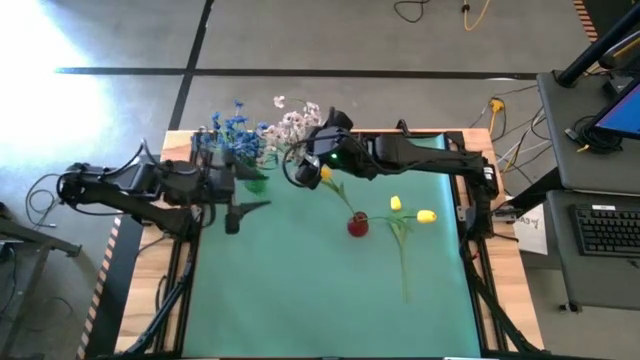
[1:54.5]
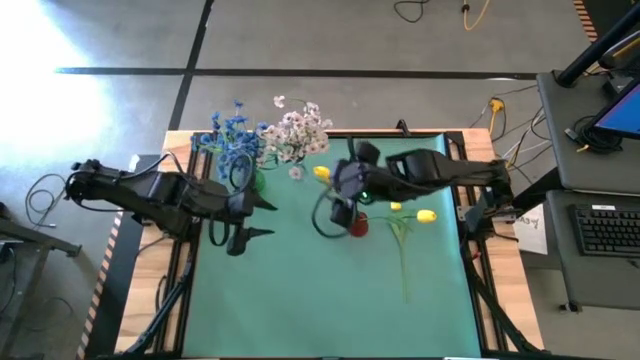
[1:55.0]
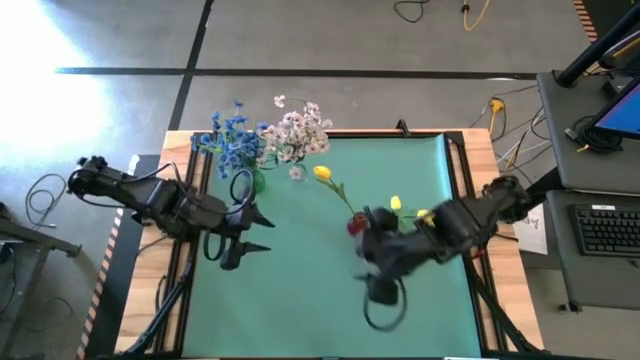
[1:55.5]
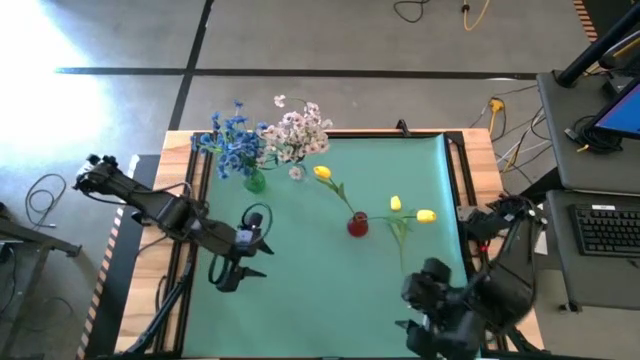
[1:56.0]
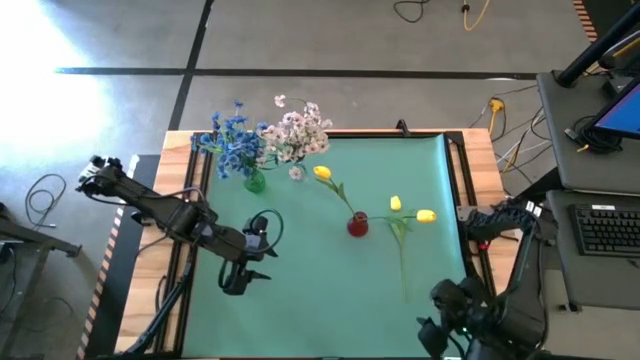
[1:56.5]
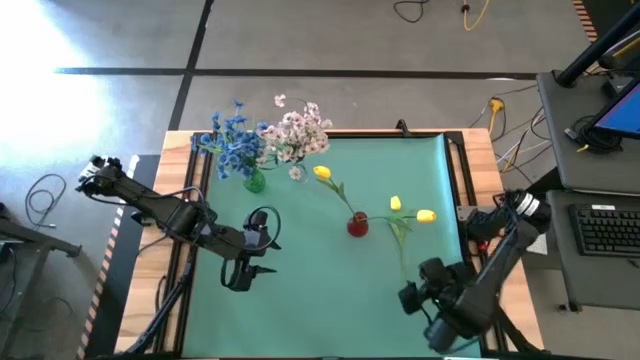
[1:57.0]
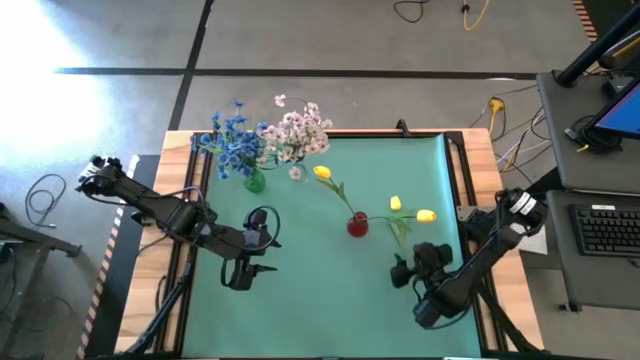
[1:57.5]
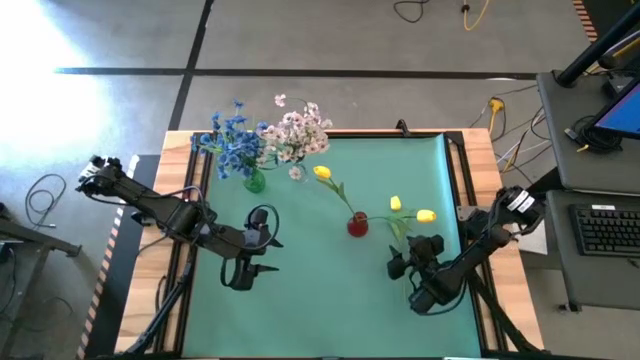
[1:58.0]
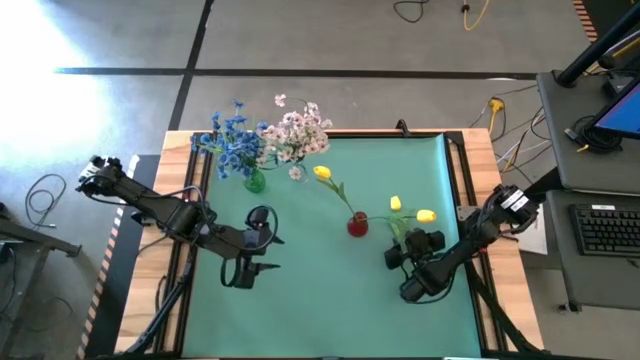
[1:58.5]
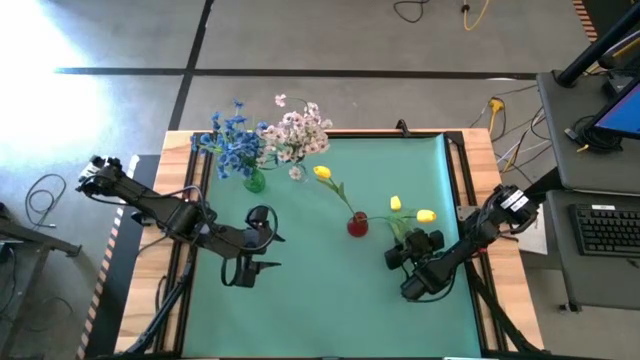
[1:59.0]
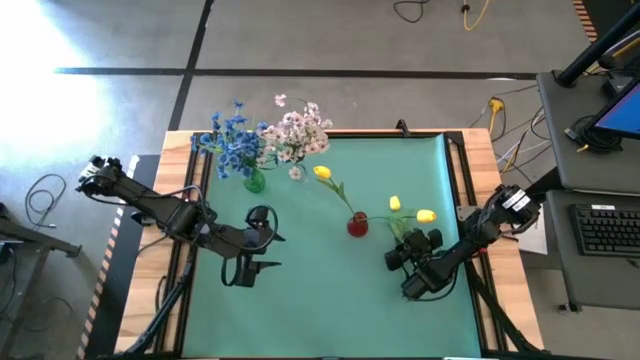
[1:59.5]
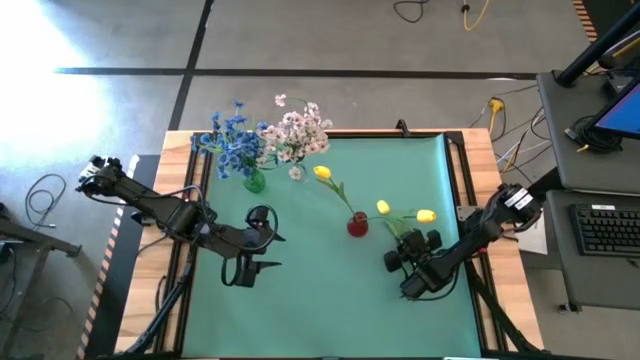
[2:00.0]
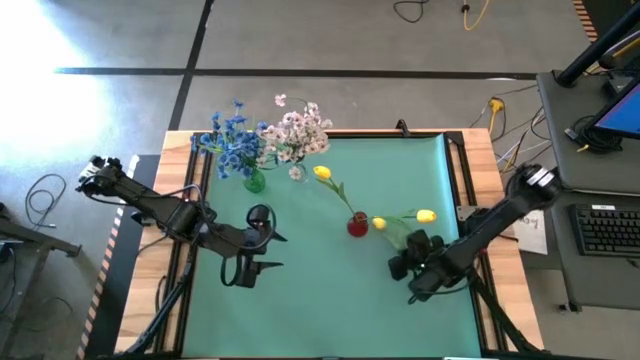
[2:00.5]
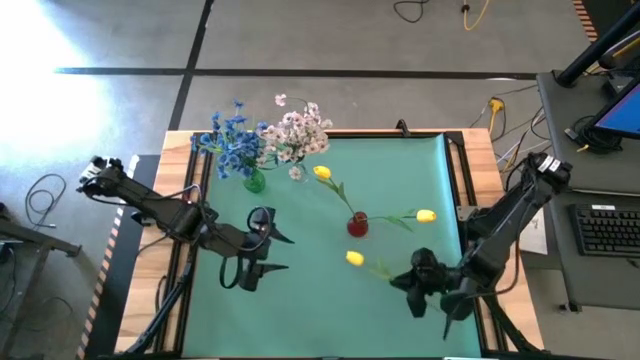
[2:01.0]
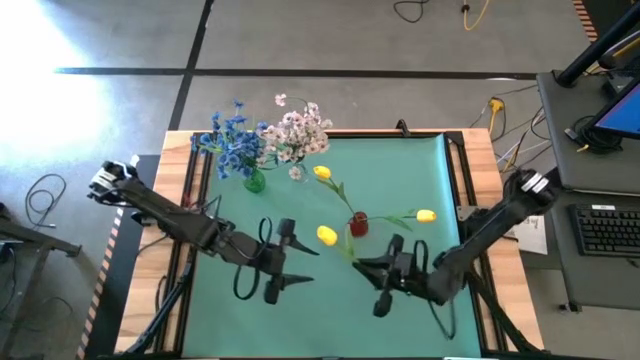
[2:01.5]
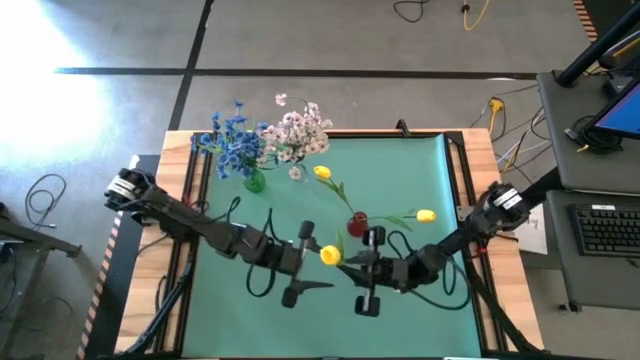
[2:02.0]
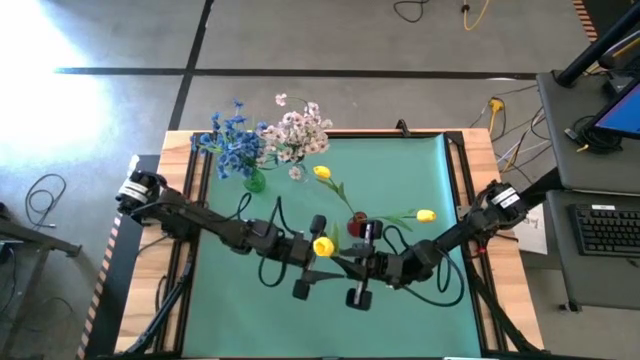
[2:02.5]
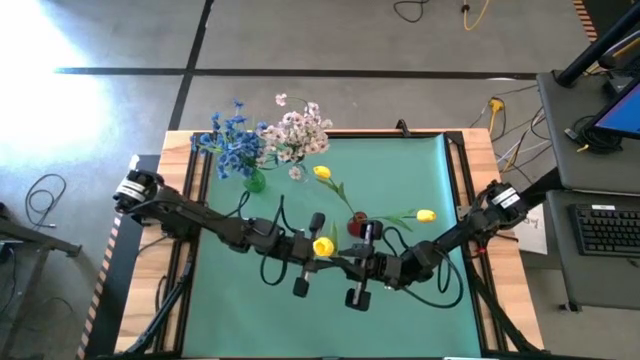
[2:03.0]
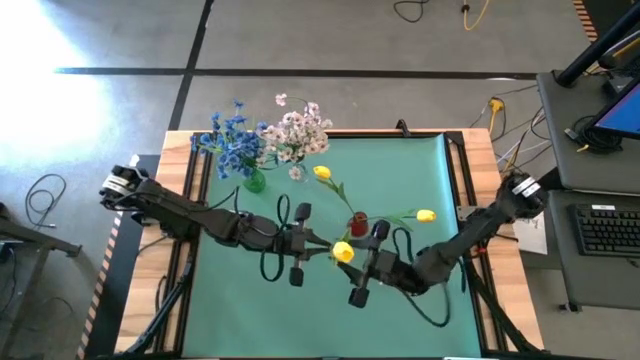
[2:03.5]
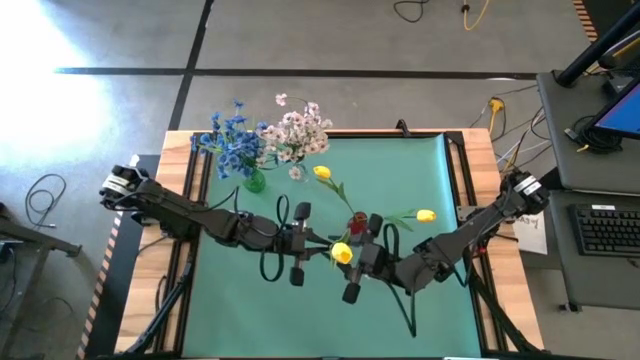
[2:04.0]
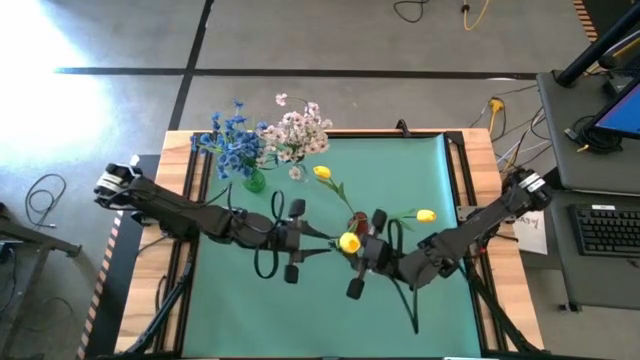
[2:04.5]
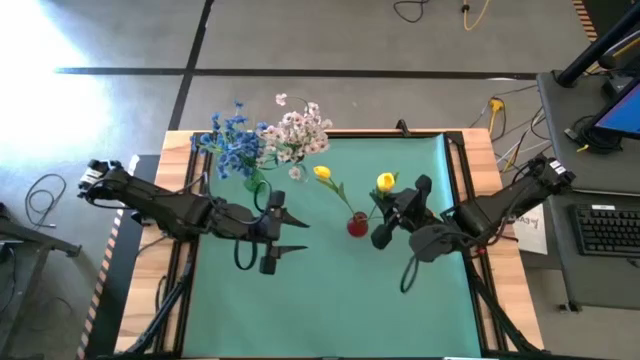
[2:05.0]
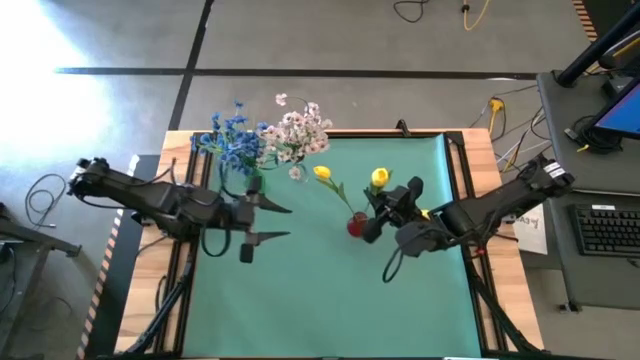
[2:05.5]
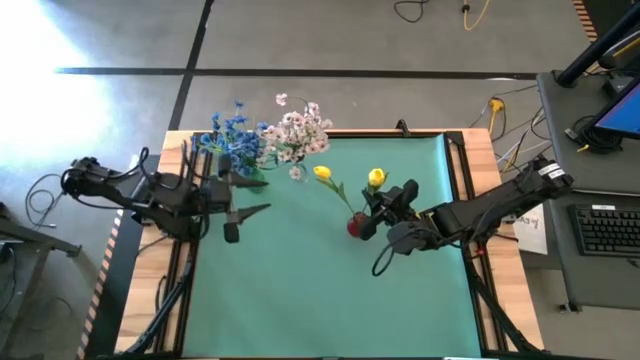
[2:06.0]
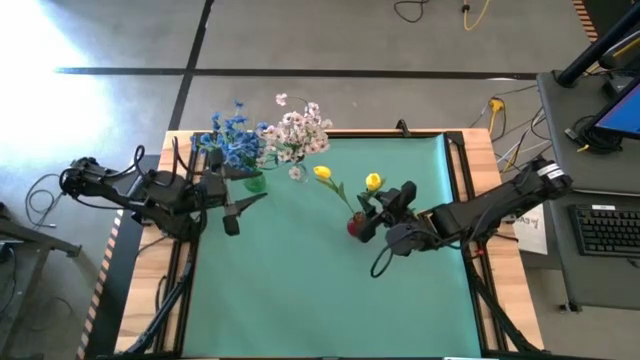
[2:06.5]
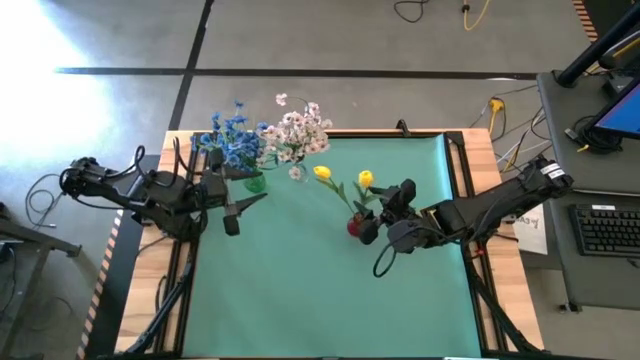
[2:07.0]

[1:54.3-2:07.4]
Task: Sort flowers into vase by color
Put the yellow flower into the red vase

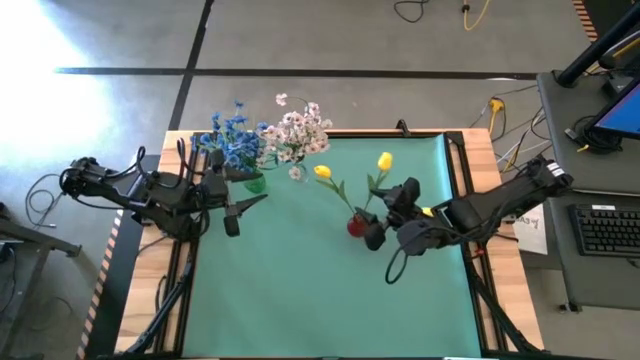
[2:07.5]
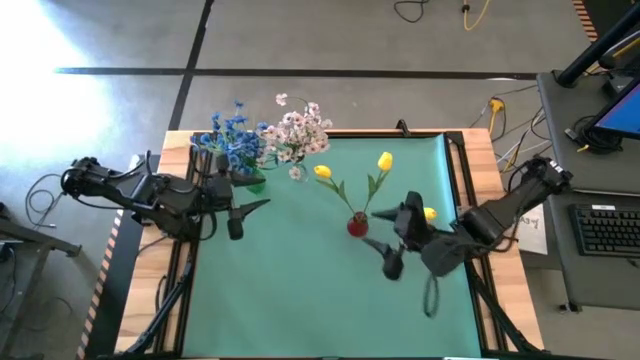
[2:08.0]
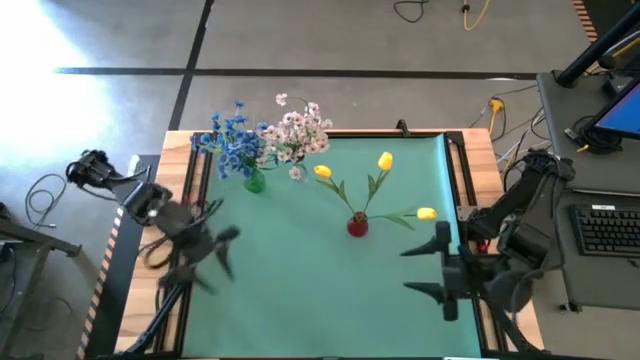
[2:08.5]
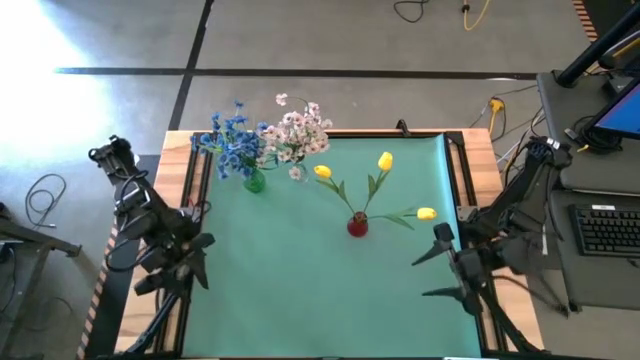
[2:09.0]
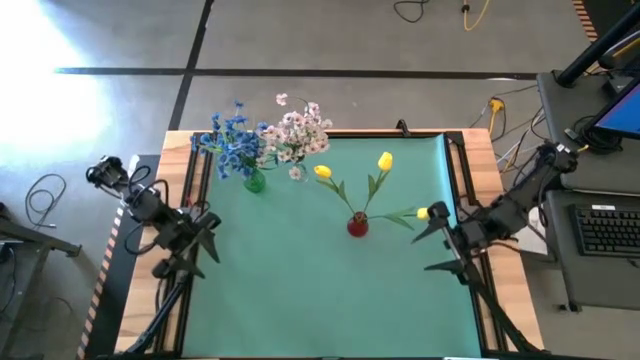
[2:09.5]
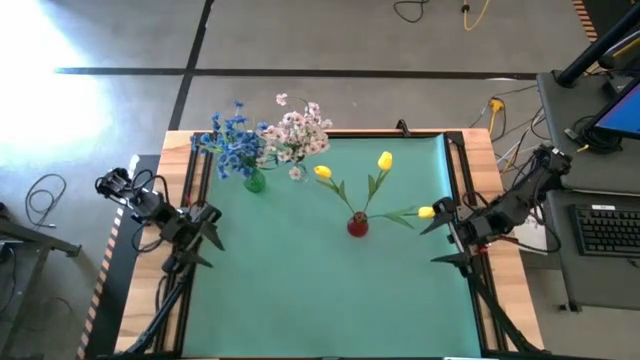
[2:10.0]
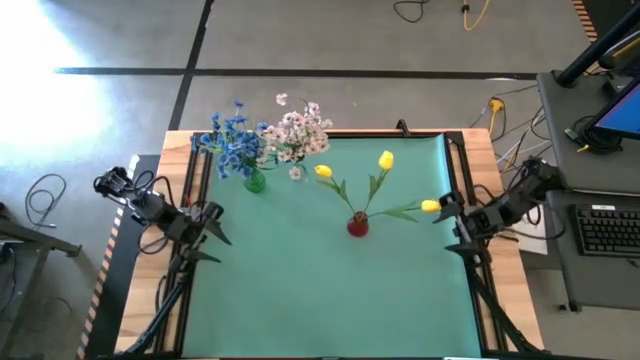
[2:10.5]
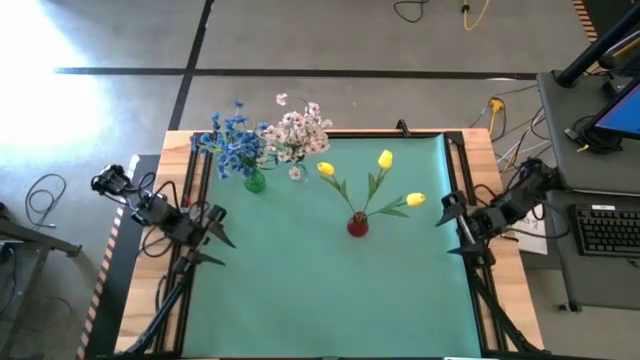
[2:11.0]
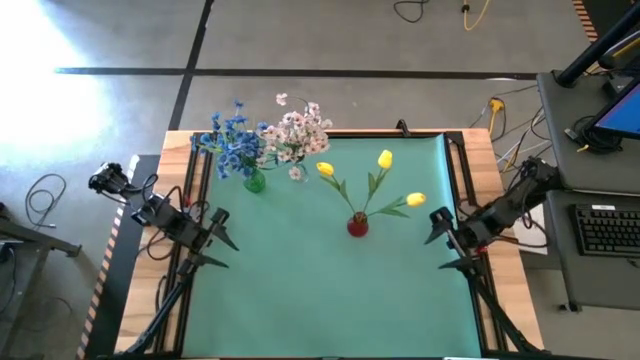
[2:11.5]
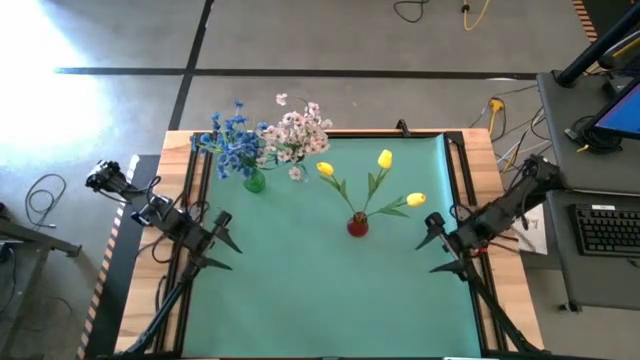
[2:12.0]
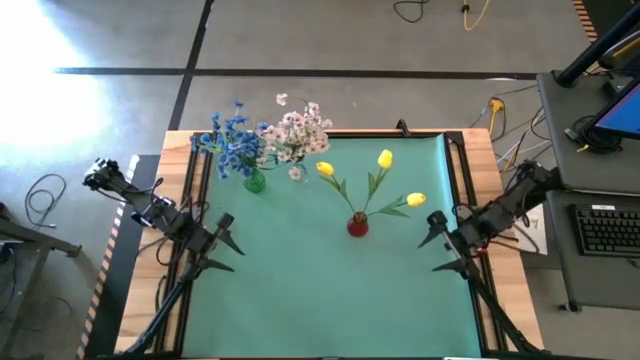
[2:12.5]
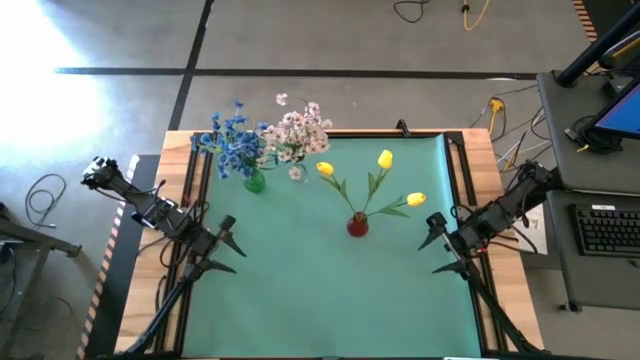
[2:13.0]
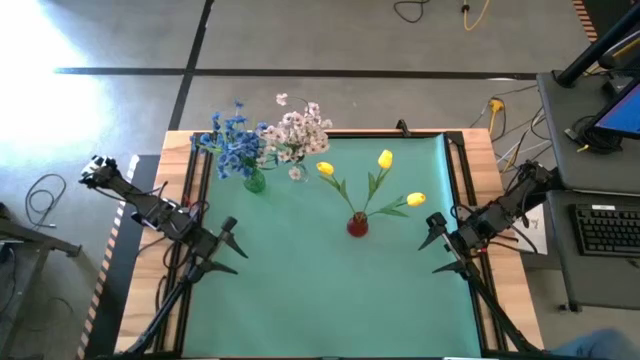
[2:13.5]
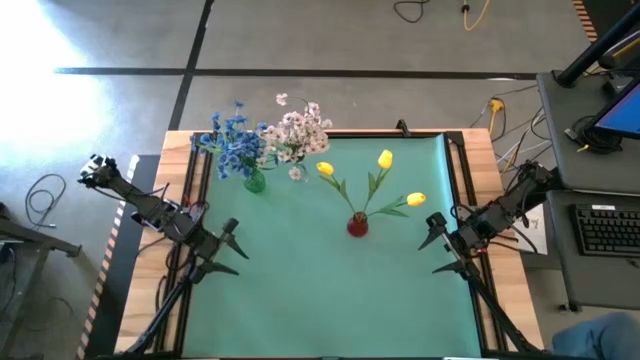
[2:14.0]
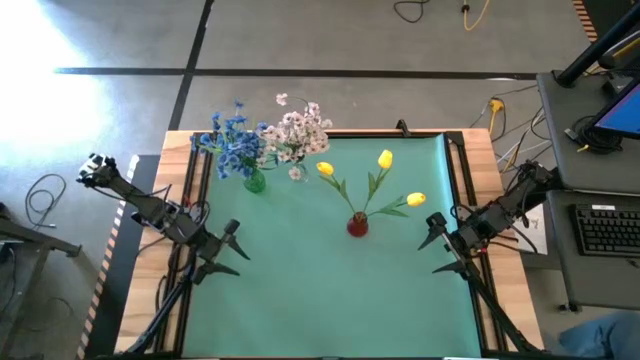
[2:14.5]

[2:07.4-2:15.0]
Return to Home Position
